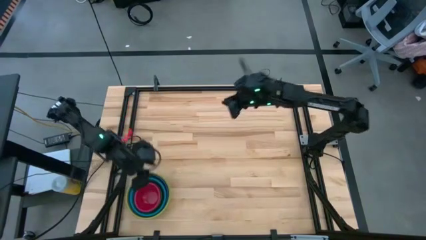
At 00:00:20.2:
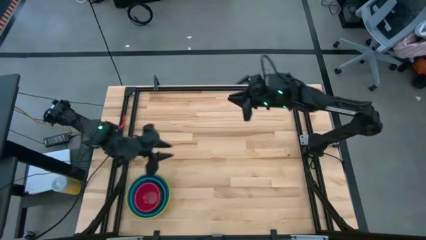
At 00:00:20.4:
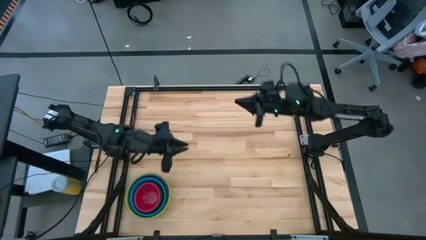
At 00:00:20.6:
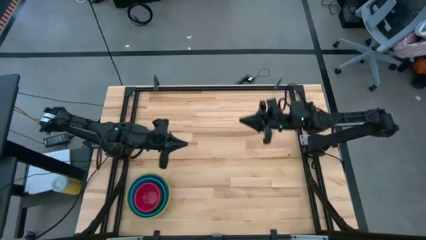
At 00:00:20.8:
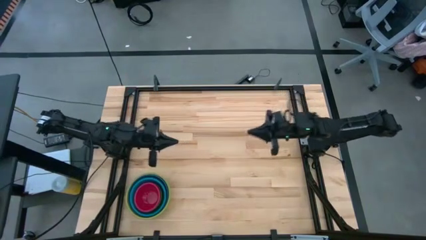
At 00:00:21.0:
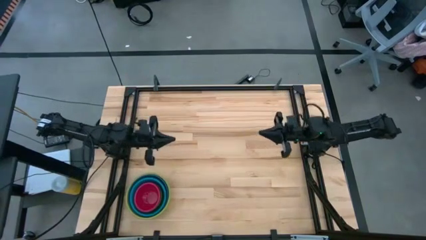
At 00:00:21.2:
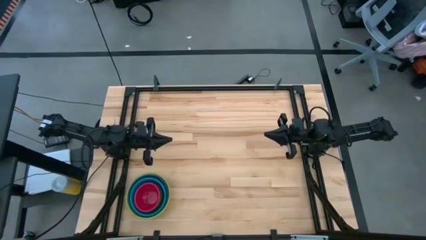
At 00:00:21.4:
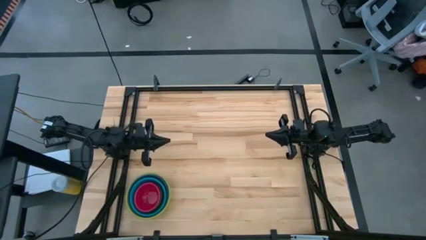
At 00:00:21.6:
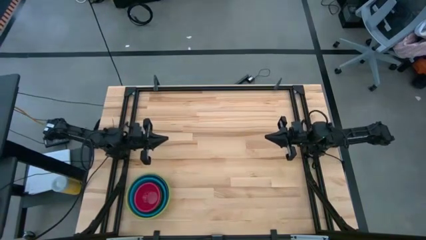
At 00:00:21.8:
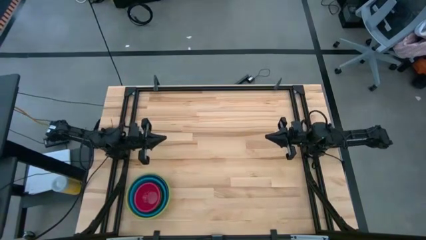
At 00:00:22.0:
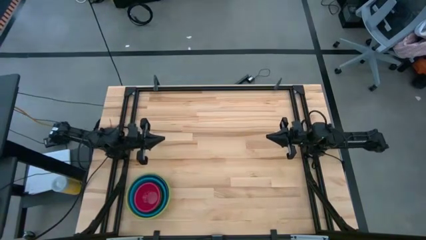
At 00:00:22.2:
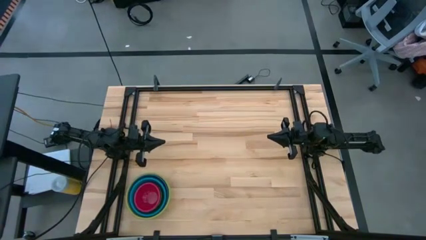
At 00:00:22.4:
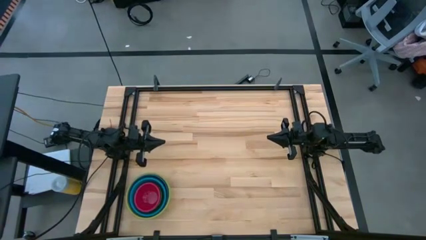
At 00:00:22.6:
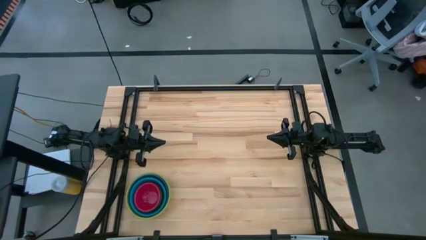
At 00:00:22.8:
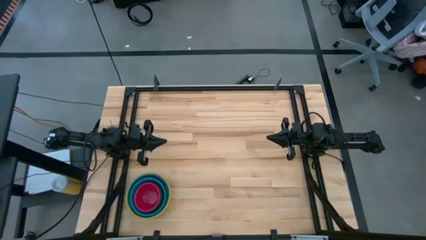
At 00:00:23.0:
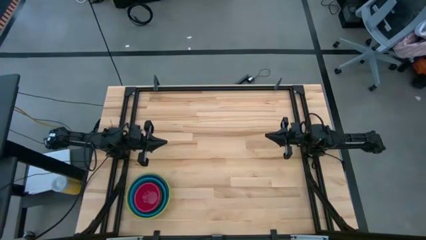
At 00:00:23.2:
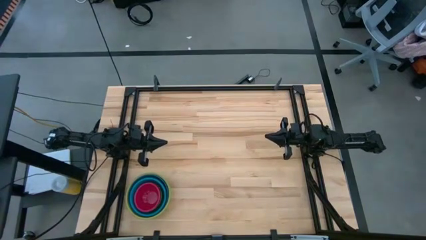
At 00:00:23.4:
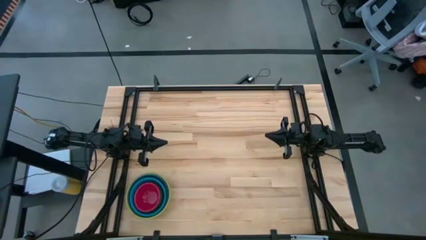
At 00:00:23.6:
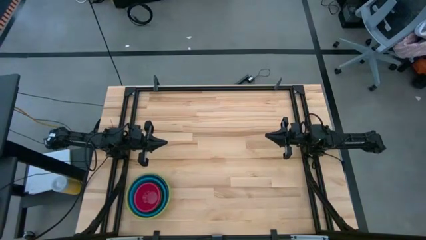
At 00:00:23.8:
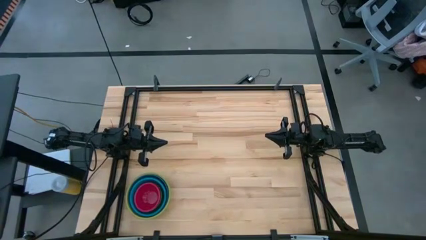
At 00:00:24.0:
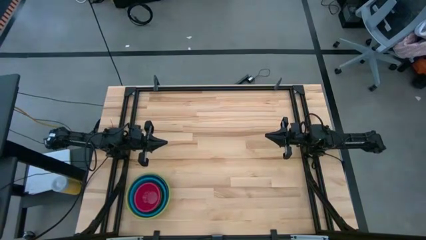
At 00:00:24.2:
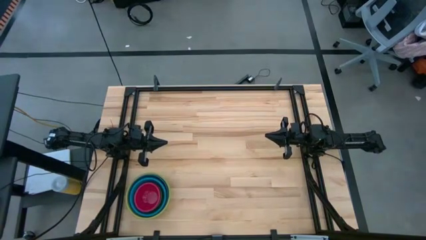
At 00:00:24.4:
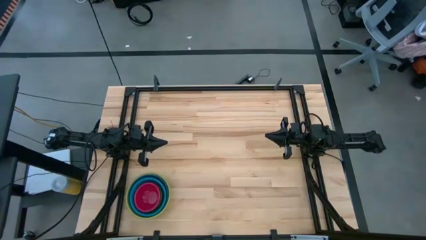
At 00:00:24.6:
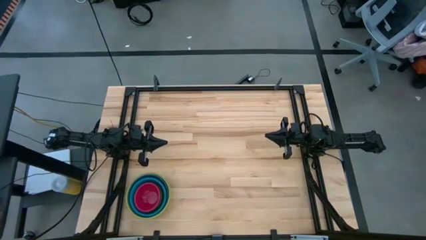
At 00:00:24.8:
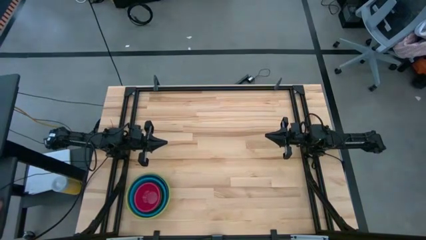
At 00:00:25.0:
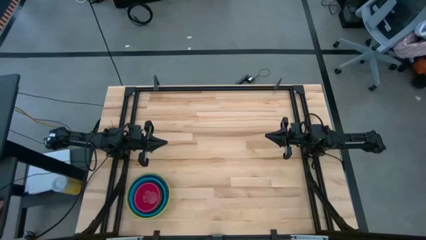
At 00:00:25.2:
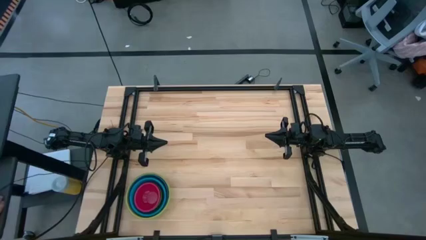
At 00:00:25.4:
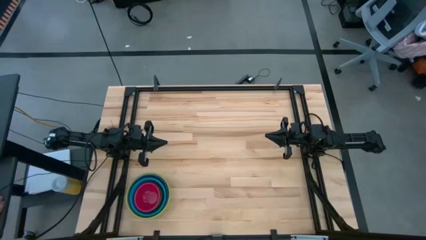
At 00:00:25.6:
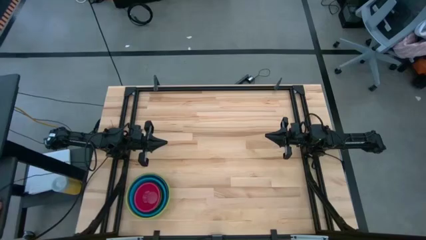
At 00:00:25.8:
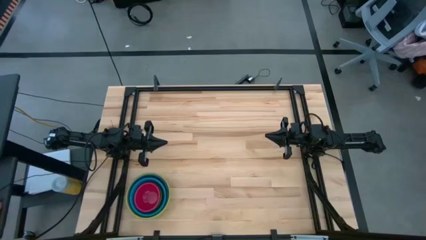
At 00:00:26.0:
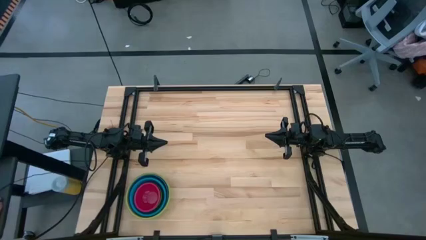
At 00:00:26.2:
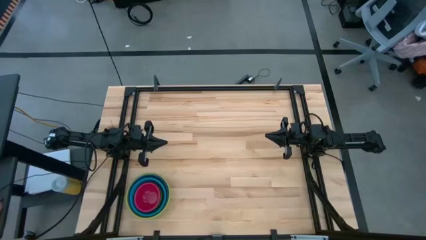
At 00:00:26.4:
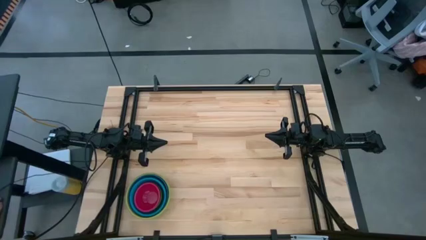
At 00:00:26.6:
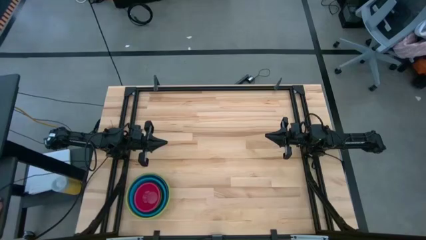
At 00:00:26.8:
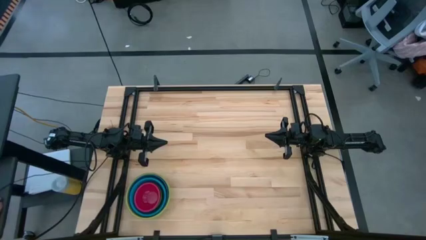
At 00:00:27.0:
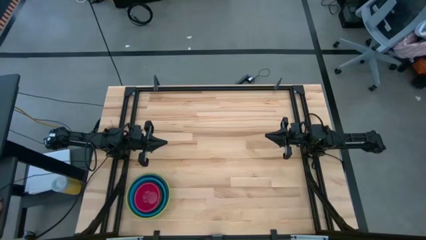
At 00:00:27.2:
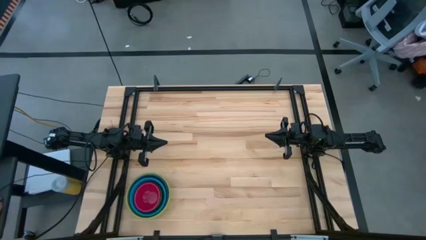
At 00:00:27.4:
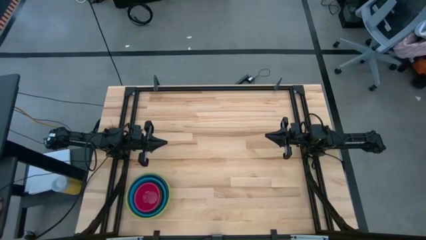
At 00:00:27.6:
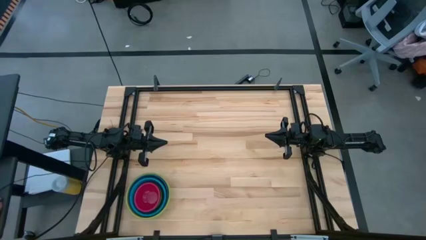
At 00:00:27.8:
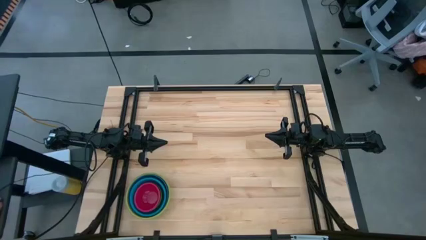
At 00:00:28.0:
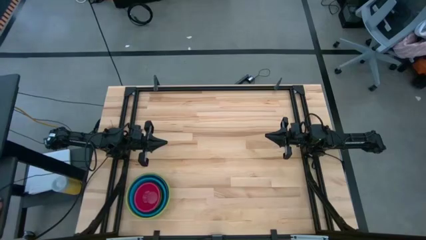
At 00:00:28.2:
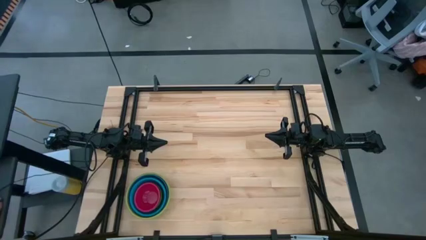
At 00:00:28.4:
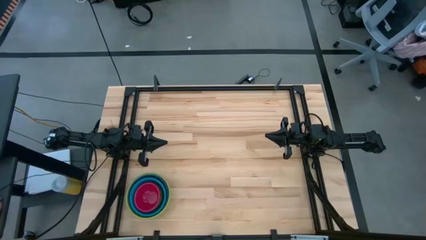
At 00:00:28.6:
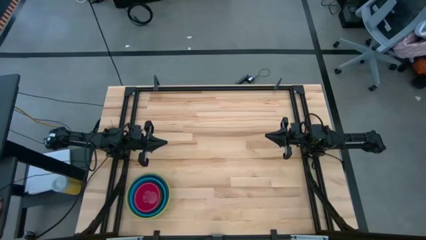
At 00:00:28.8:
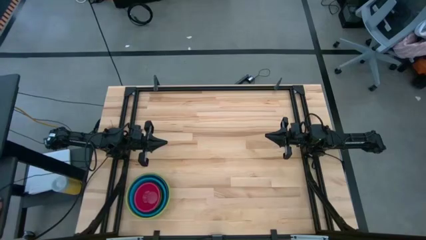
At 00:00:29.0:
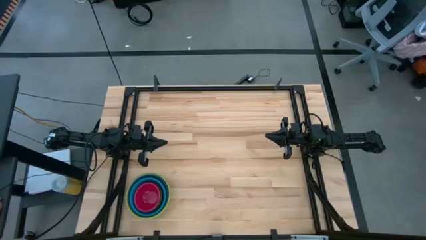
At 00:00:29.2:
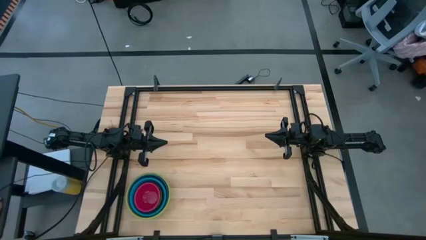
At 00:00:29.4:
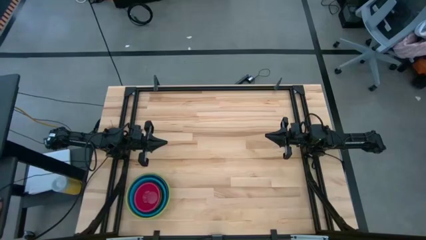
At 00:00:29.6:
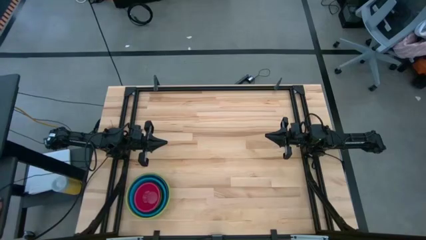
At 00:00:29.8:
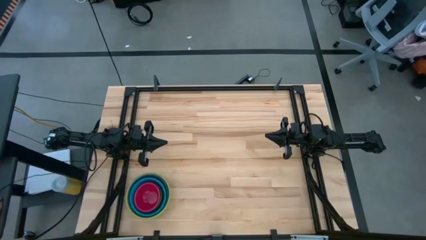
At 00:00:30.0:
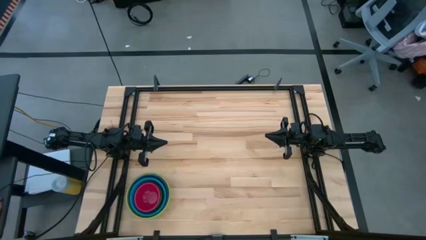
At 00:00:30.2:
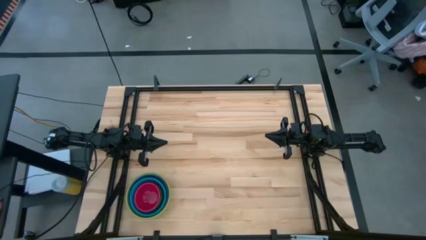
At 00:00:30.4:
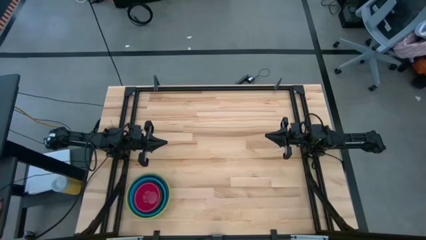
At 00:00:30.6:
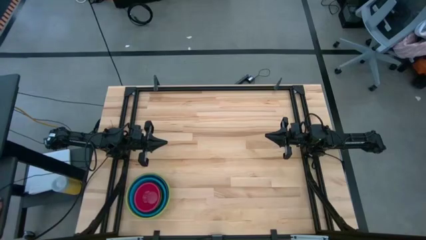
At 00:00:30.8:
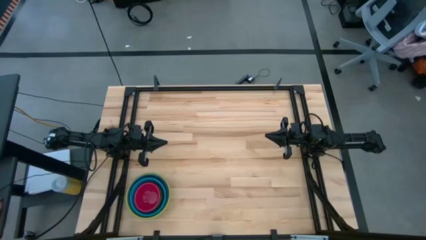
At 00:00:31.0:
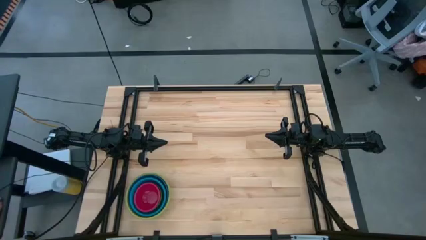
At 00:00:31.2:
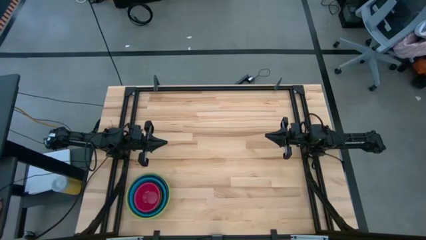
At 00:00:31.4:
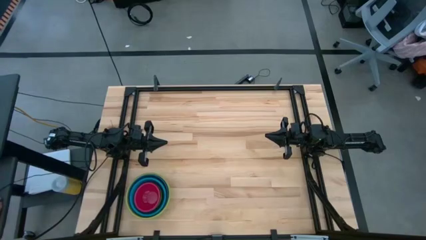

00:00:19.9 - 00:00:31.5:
Return to Home Position

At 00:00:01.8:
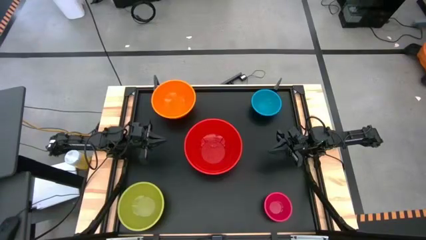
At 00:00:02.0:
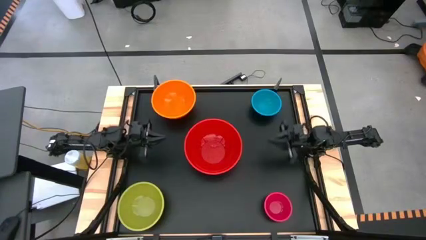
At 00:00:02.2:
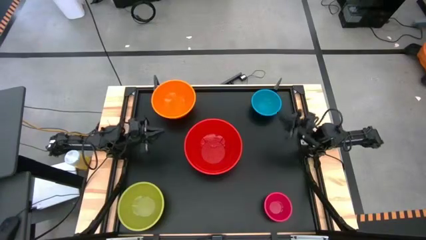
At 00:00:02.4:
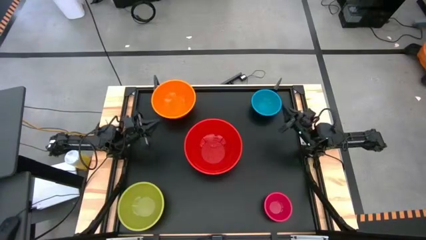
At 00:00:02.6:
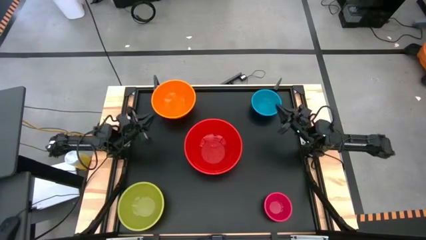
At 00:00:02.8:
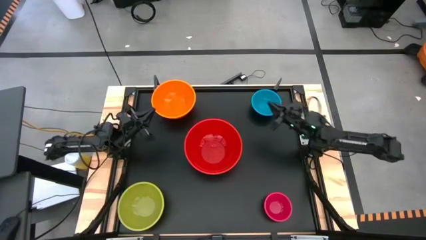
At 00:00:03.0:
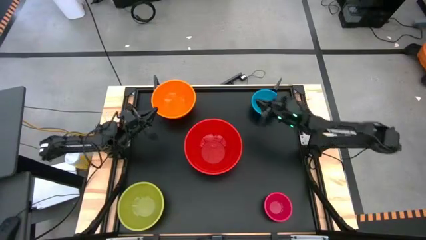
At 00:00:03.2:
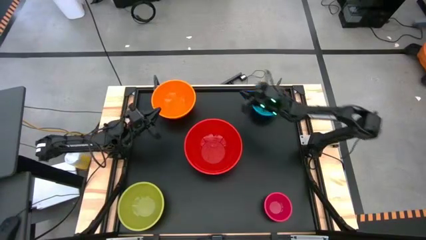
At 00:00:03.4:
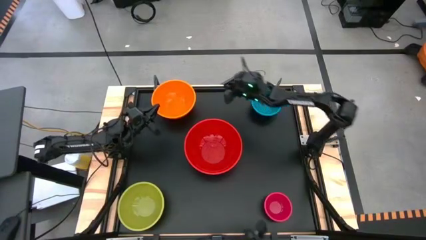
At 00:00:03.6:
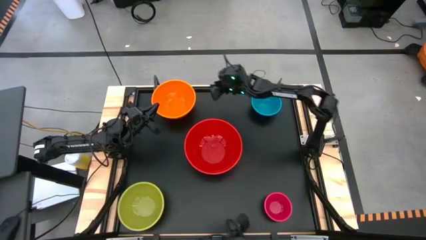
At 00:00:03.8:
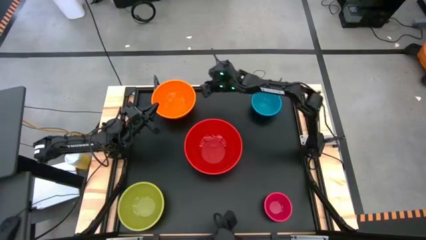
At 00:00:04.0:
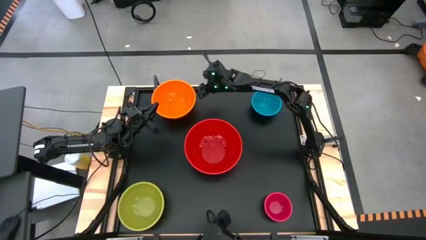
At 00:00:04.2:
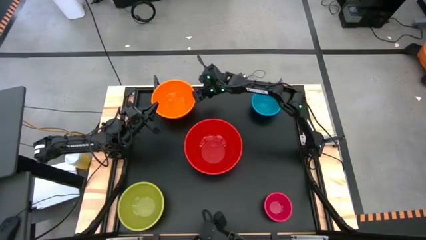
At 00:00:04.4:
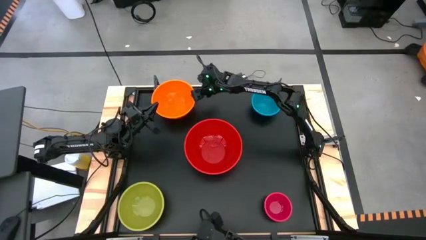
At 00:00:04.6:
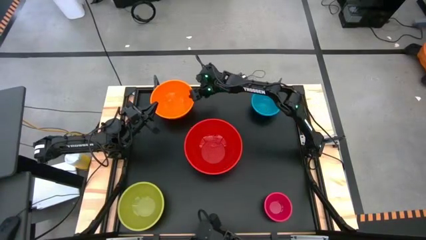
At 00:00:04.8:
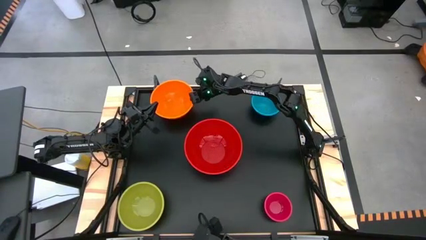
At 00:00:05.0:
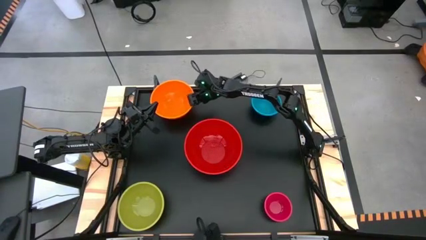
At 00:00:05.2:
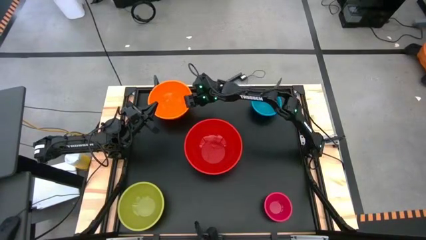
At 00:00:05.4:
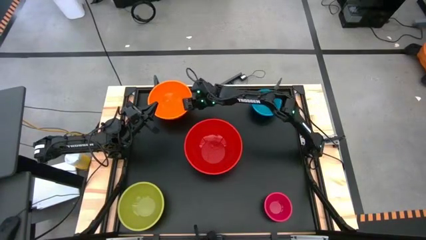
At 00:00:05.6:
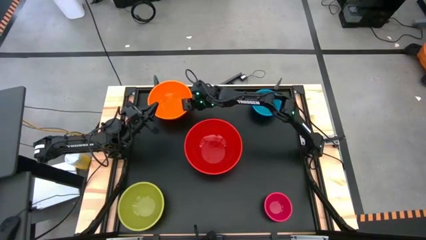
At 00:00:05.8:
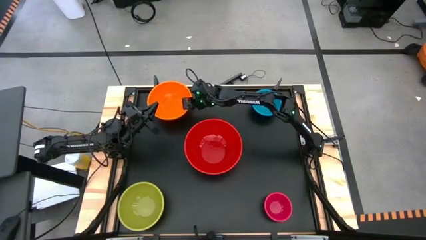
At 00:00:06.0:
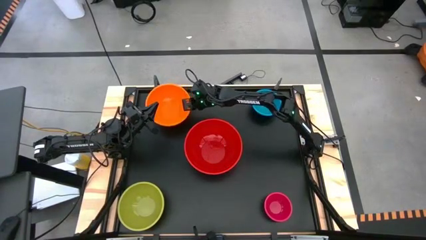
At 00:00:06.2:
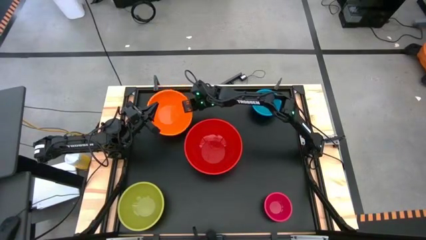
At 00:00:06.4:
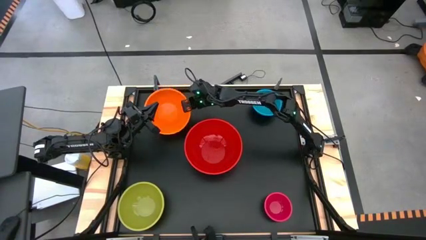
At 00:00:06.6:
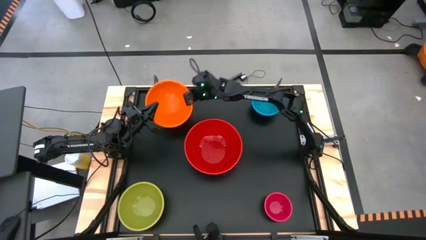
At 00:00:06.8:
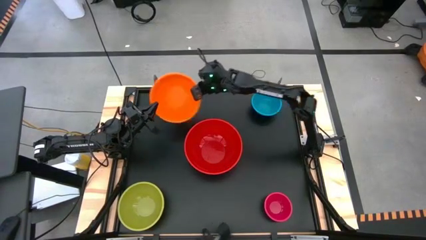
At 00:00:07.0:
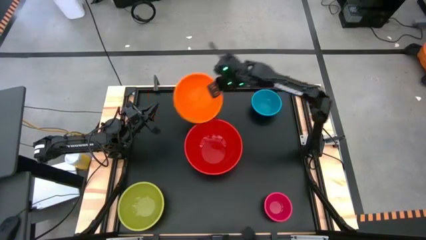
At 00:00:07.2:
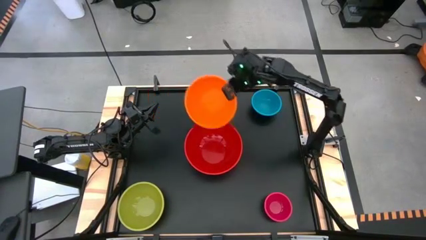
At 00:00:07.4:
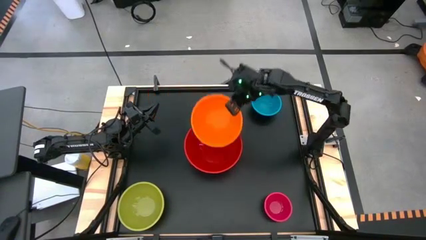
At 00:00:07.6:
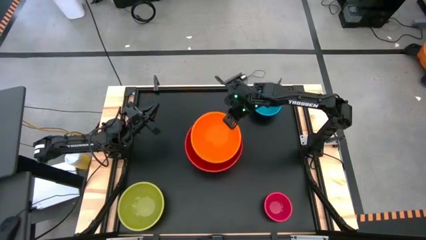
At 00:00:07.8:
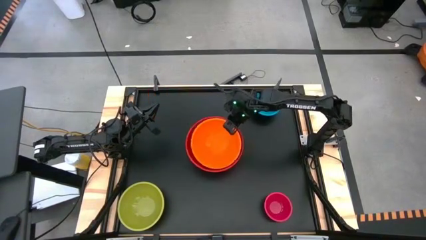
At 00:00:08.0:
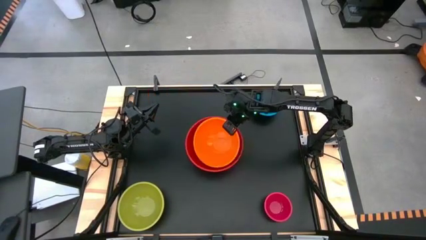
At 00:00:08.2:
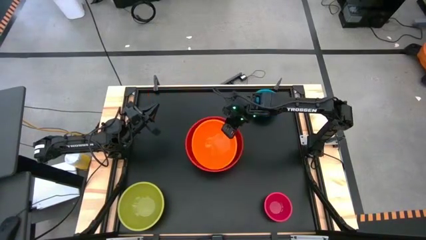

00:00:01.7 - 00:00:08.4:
Stack the orange bowl on top of the red bowl
